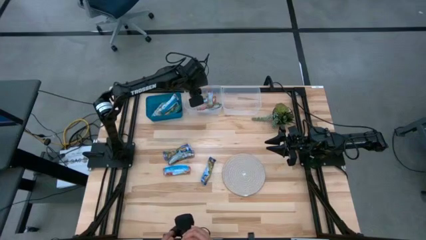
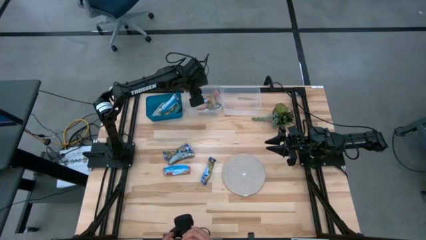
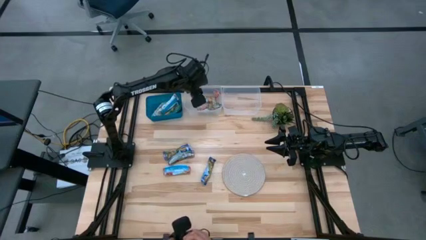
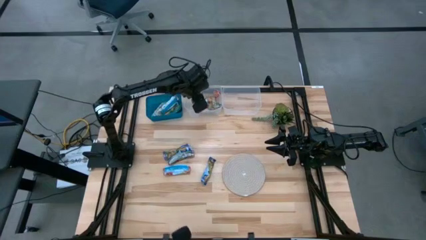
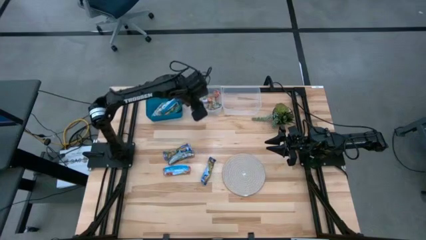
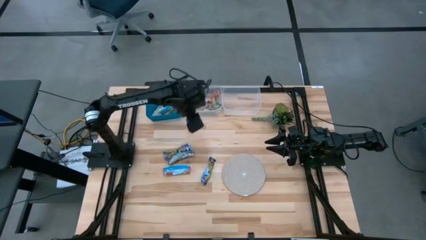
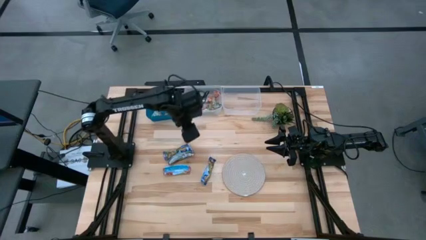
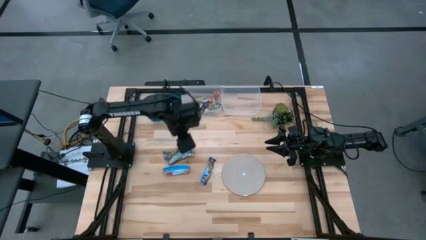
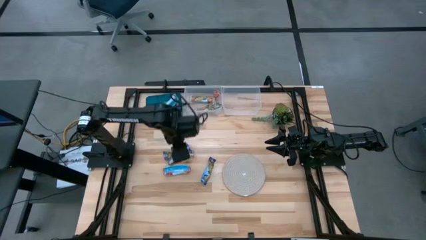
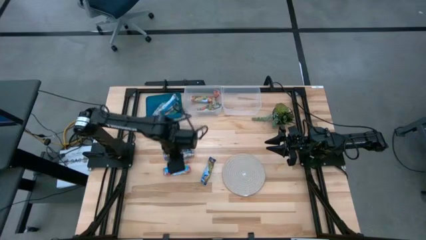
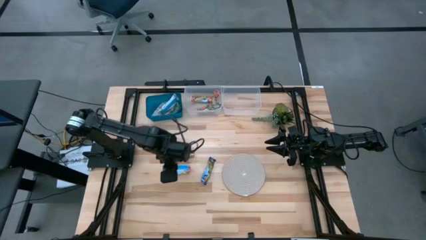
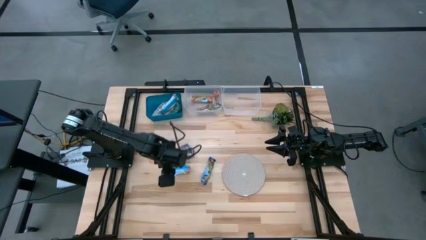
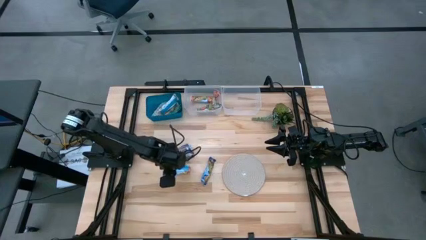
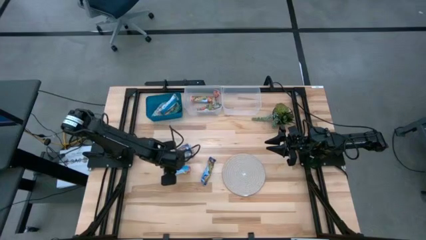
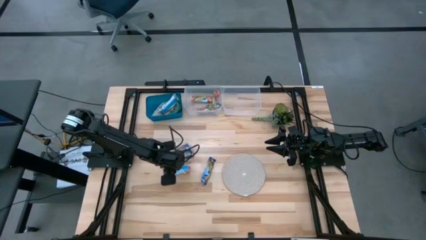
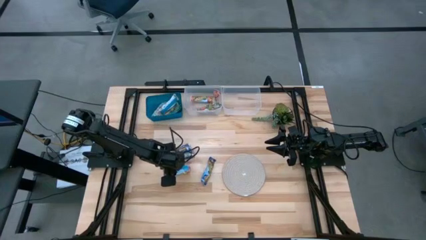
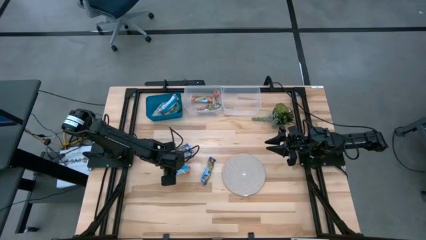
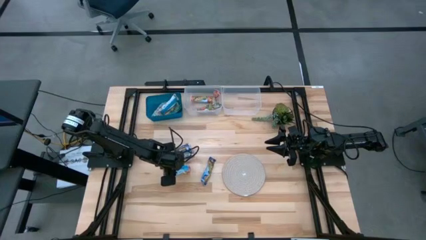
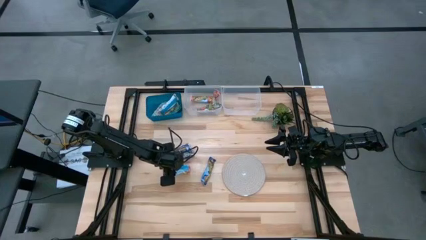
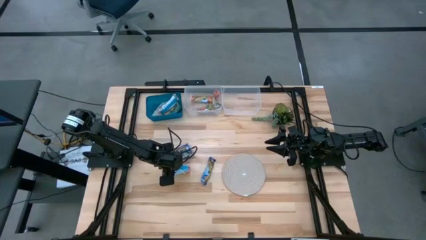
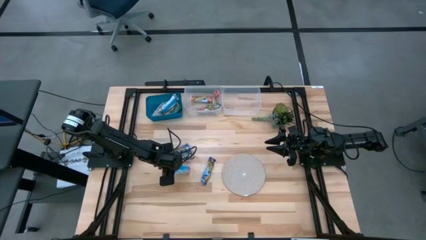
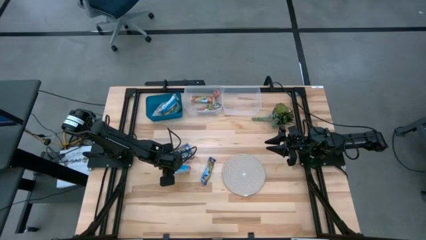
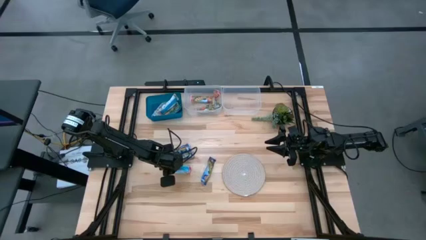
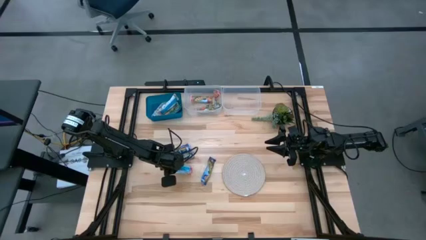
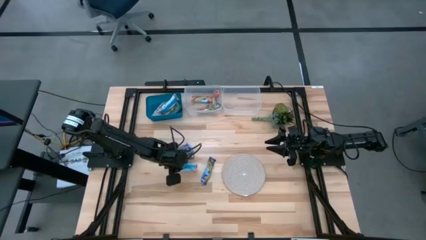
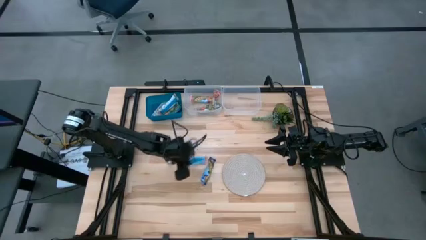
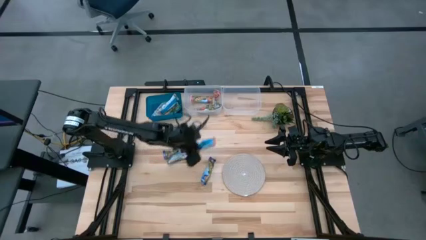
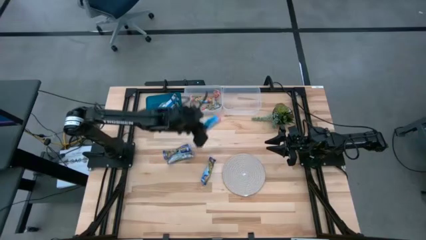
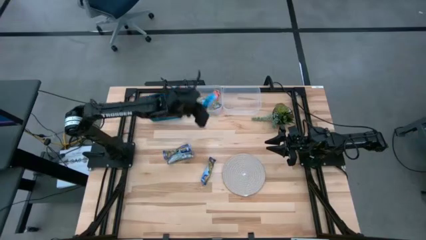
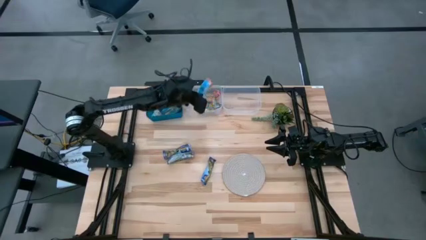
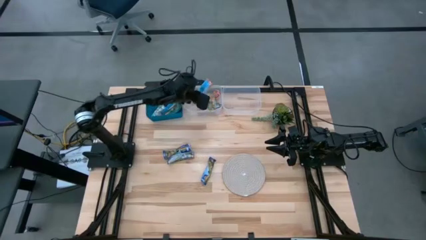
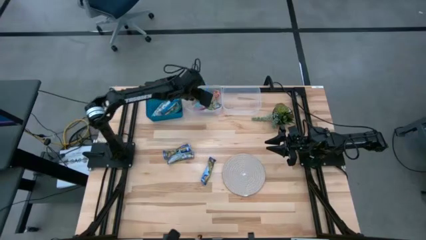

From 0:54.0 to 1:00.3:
Task: Pick and place Granola Bars by type
Put the red granola bar into the left transparent bin

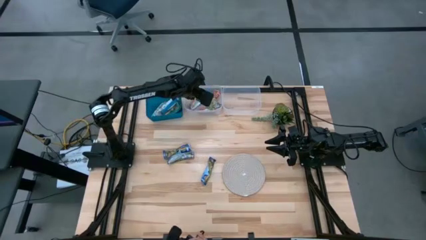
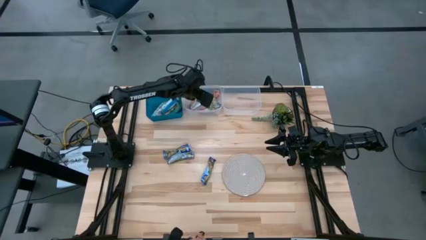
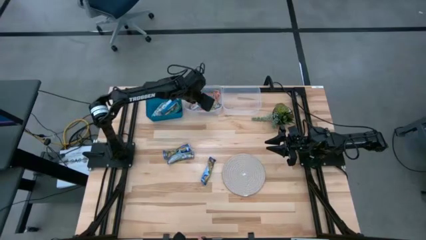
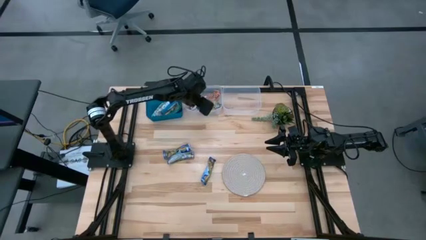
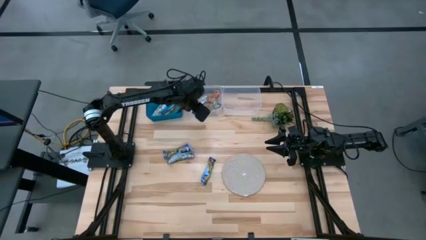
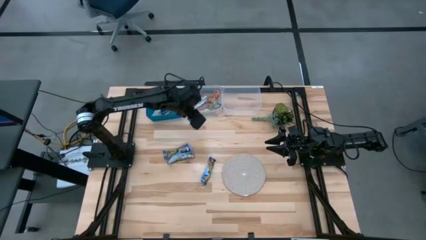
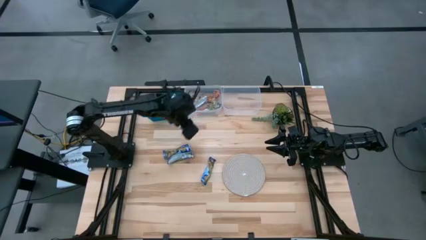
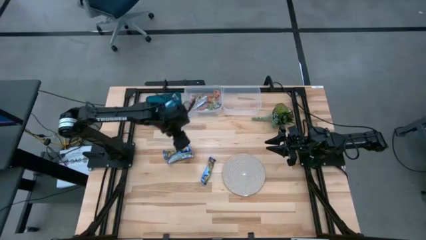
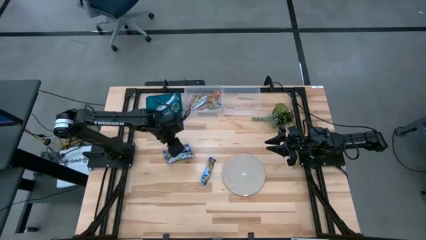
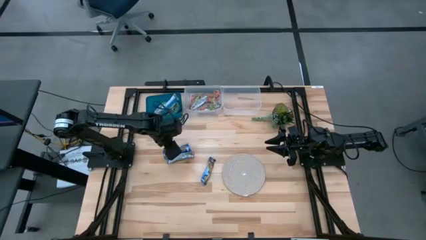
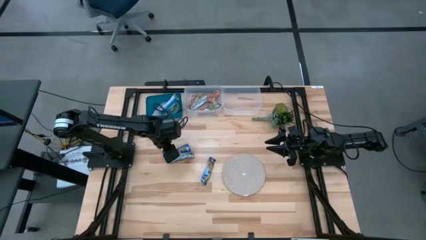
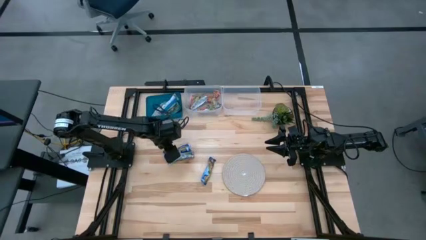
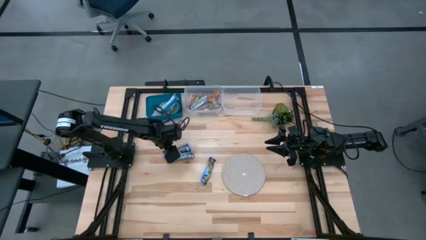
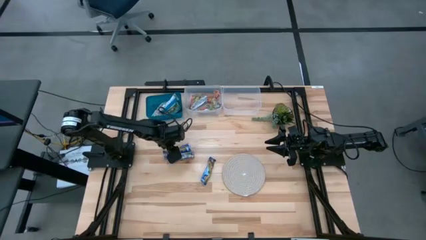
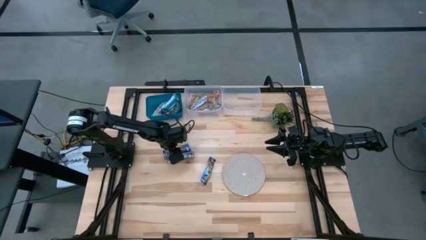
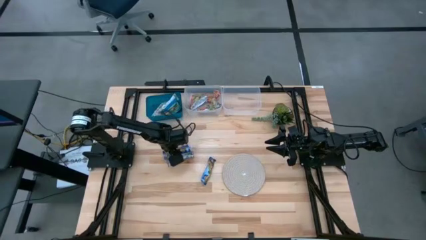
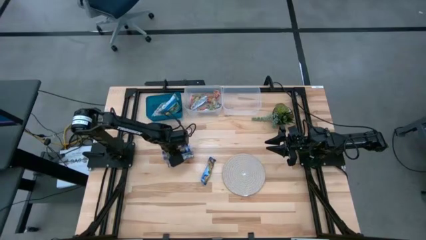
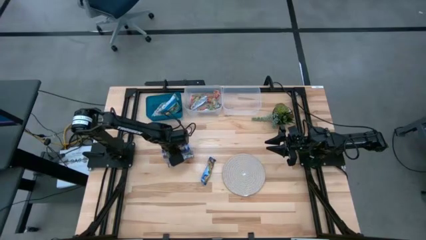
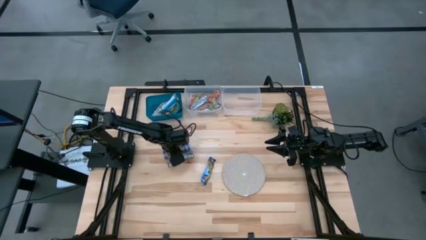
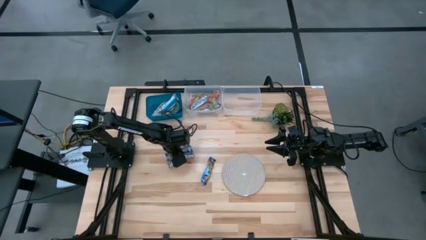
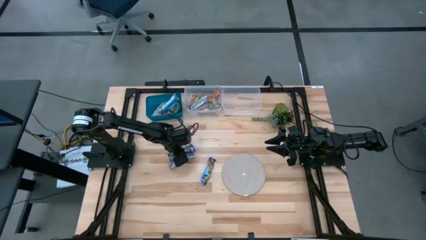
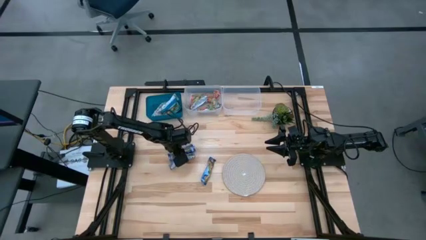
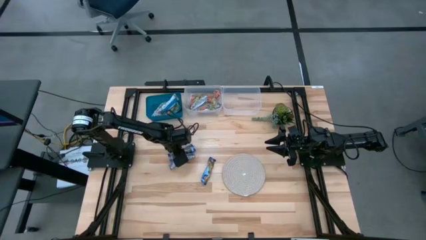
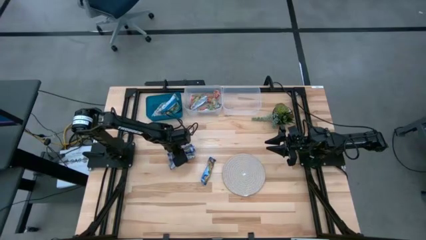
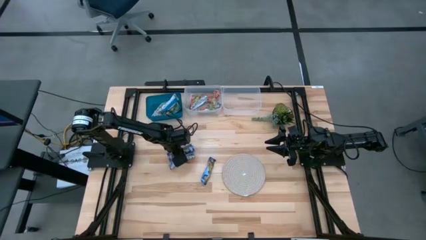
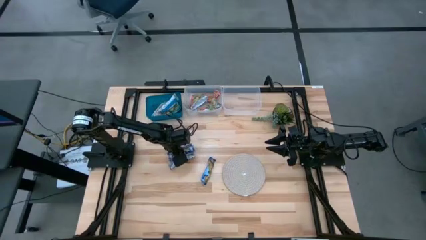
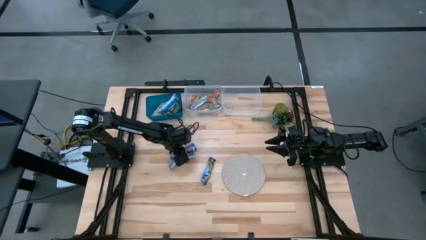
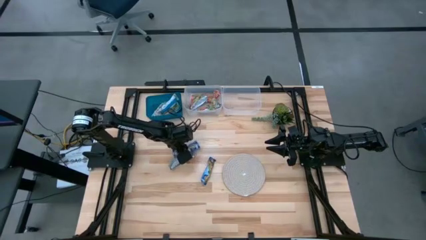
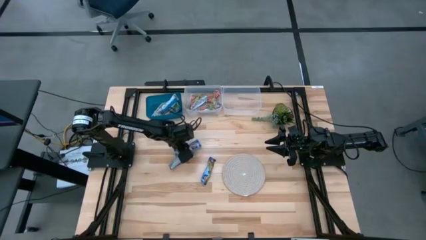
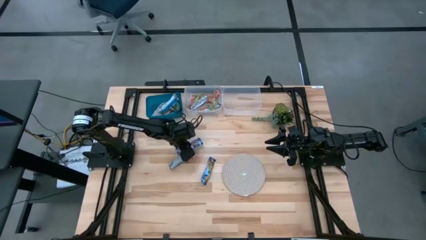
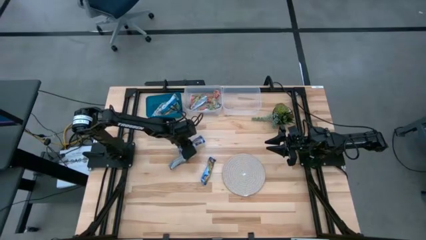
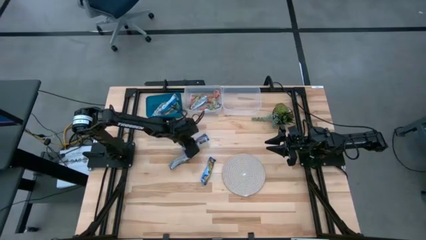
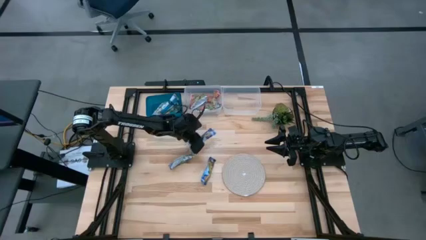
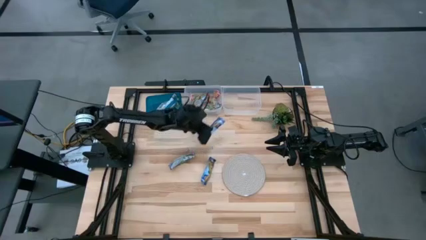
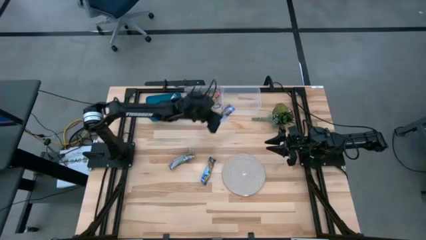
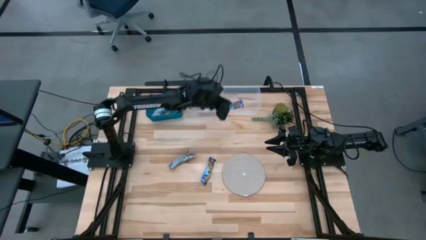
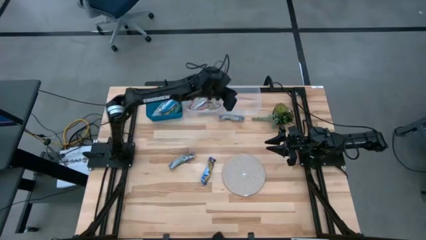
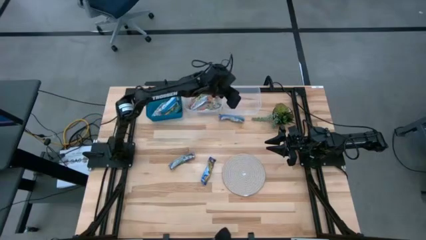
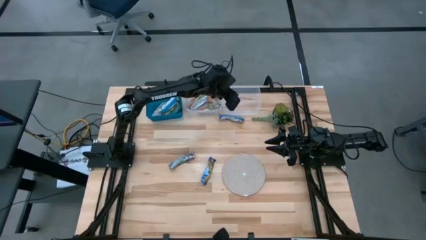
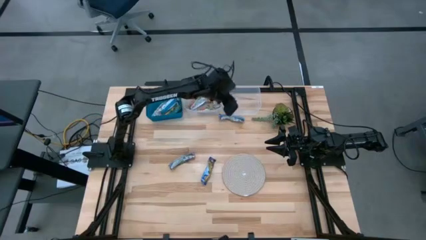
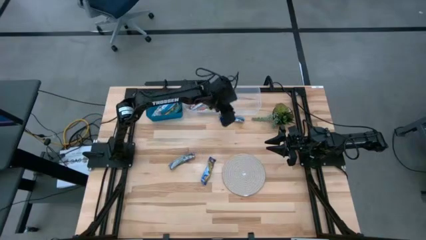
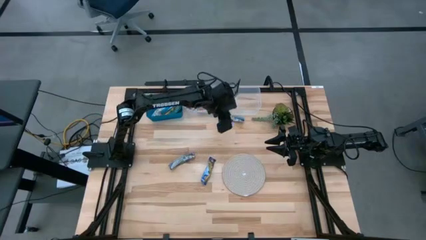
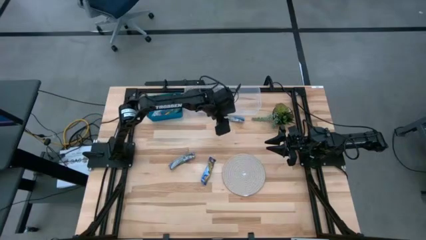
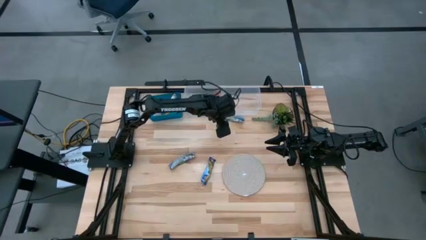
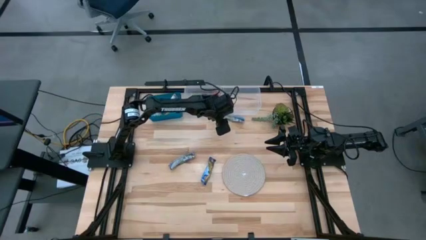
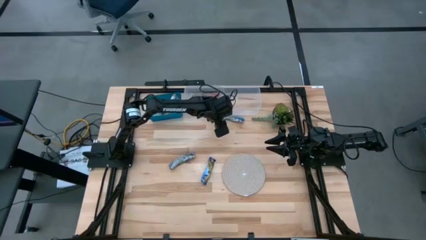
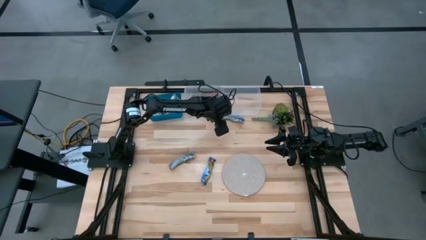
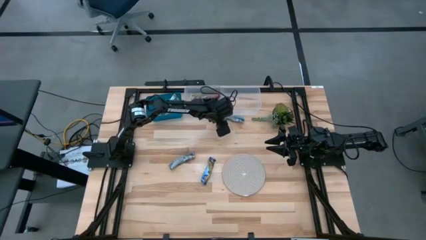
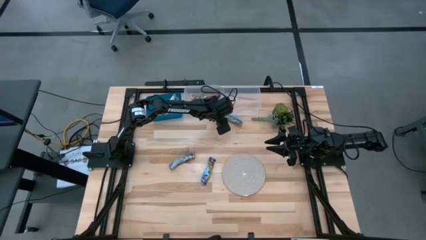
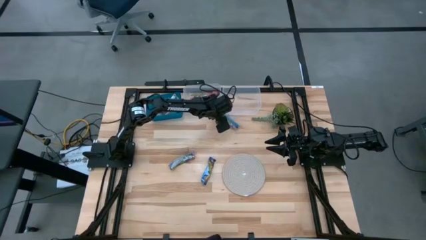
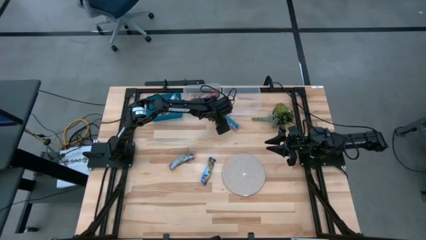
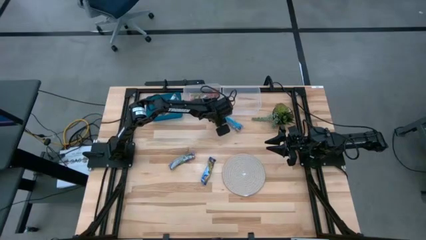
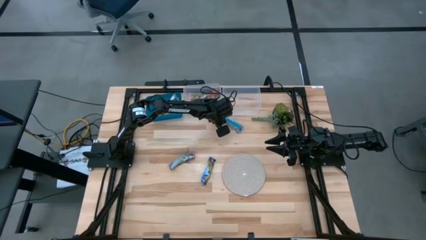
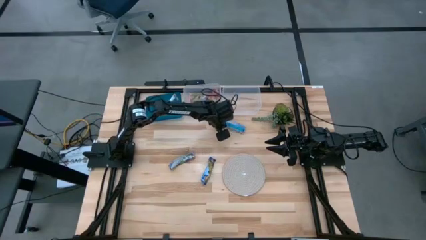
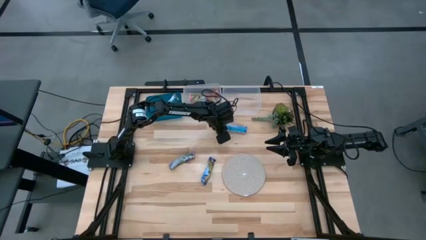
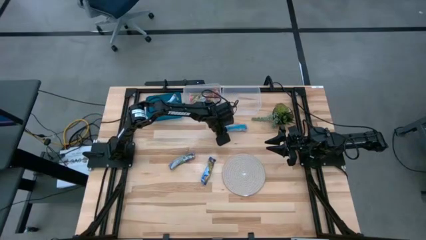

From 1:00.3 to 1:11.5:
Put the blue granola bar into the right transparent bin
